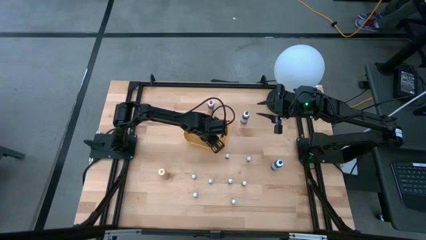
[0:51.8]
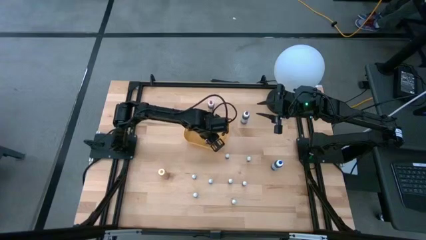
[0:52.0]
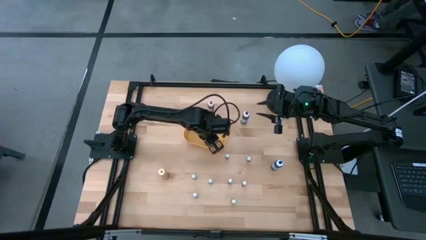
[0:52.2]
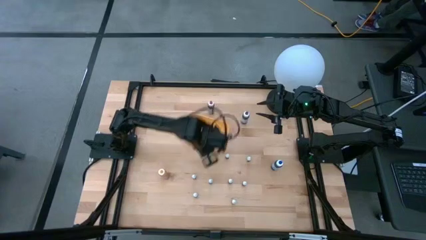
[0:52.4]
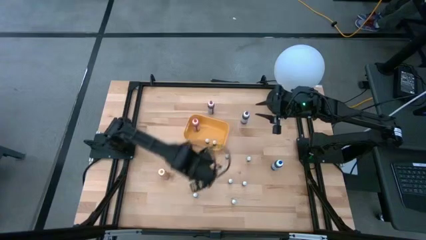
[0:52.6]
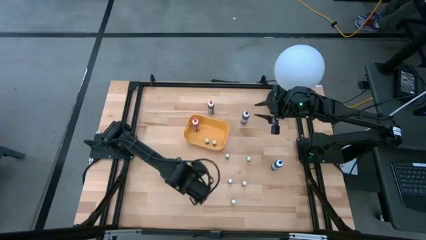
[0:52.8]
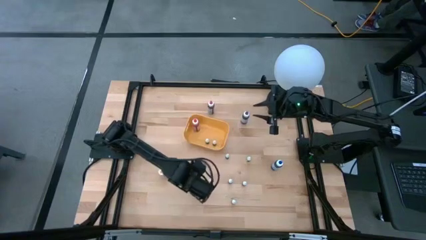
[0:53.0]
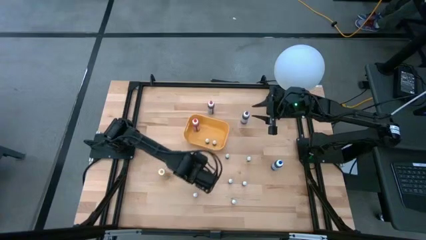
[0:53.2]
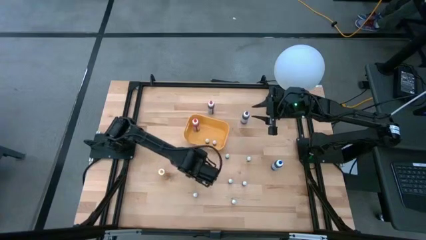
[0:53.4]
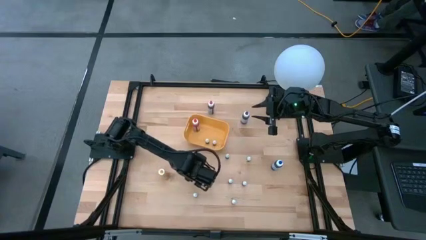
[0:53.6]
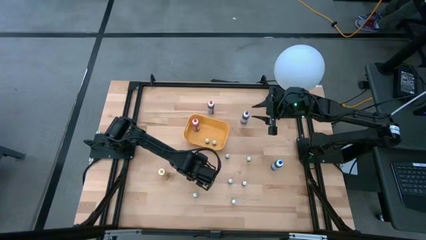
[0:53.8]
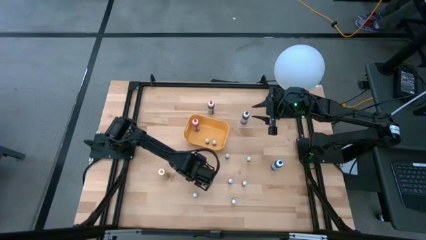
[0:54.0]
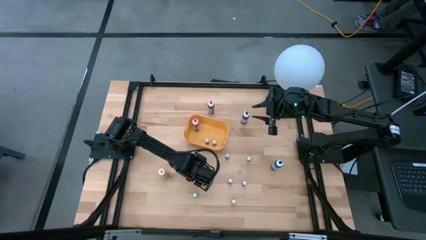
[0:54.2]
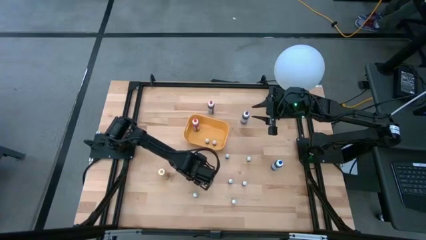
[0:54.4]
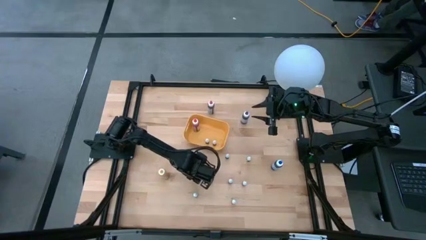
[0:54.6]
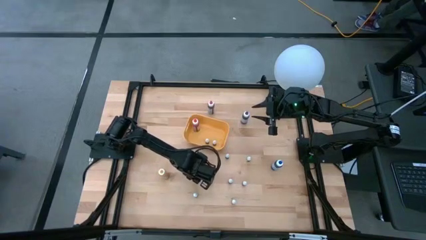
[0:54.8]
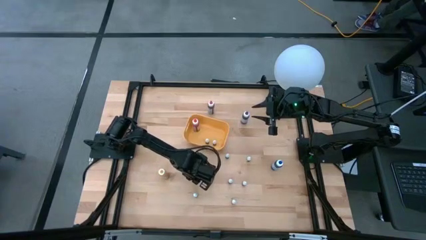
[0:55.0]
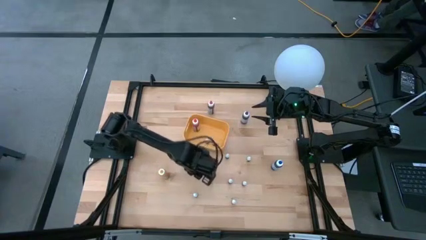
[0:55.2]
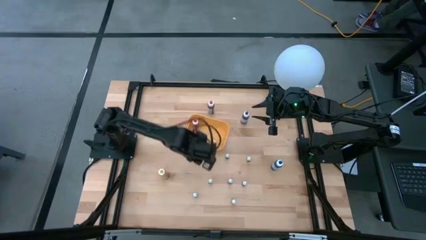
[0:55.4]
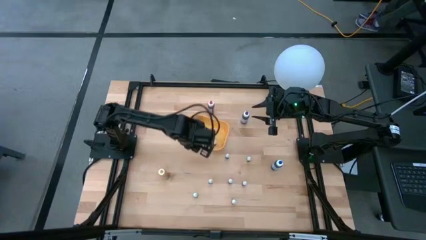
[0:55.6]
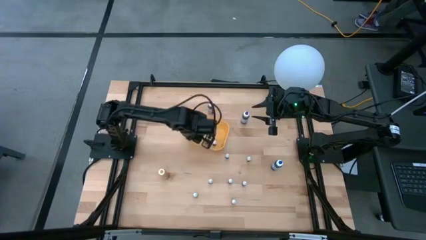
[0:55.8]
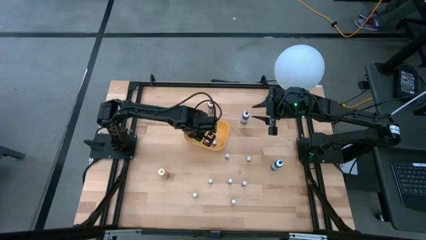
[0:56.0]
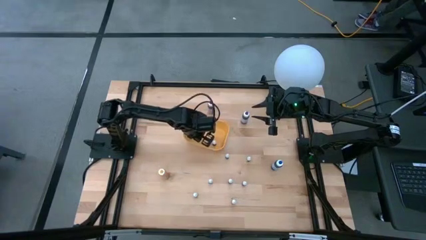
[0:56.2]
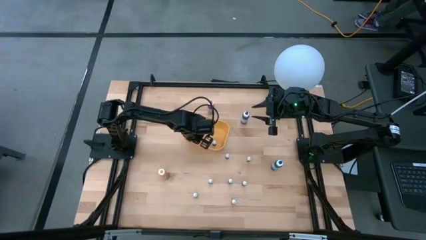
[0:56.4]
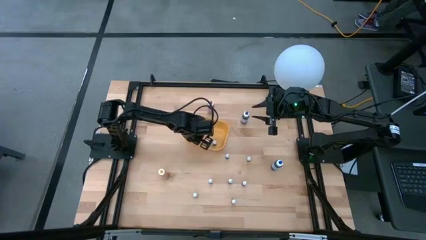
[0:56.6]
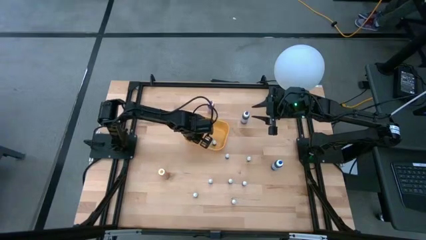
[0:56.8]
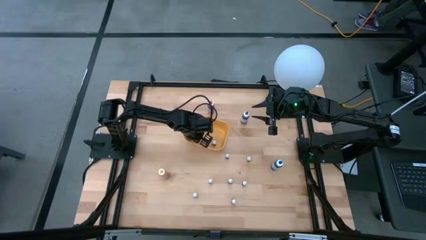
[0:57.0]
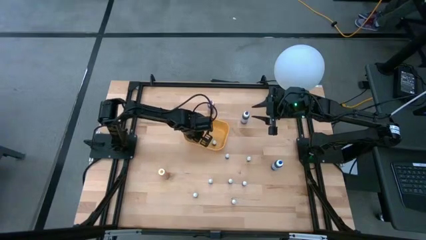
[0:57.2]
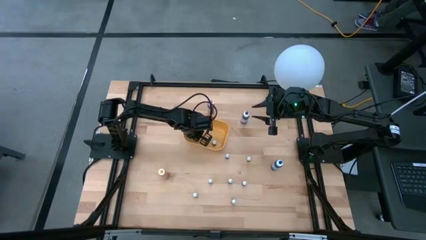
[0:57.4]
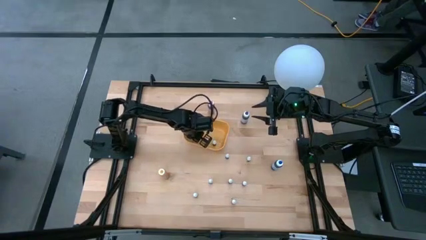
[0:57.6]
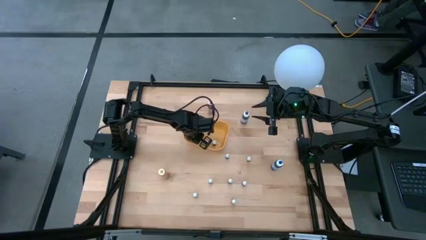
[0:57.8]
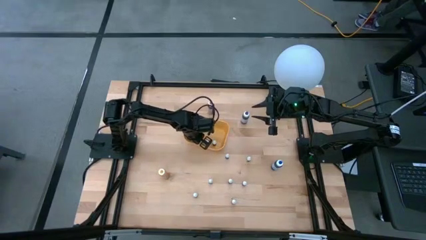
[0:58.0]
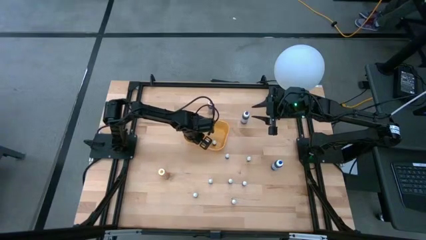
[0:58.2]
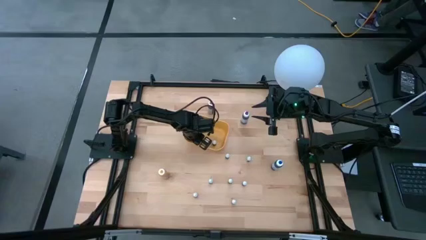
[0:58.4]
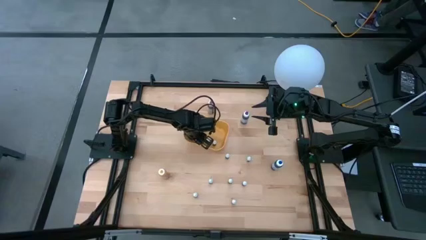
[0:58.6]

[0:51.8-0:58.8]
Task: Pick & Place food coloring
Put the bottom small red food coloring bottle into the yellow bin

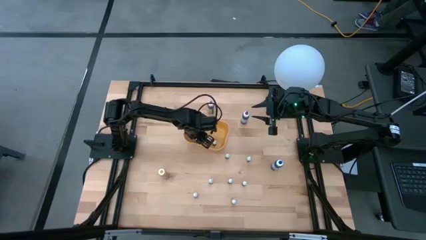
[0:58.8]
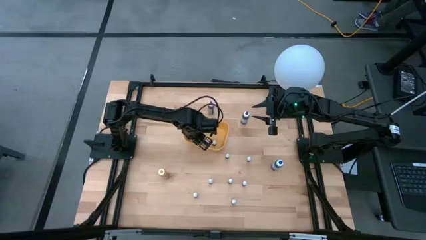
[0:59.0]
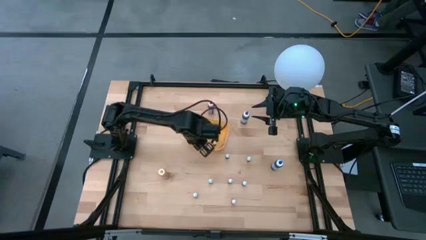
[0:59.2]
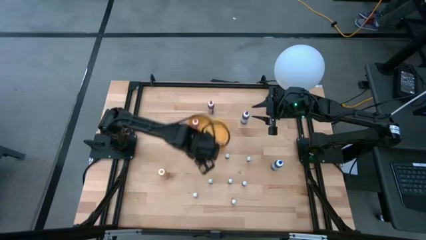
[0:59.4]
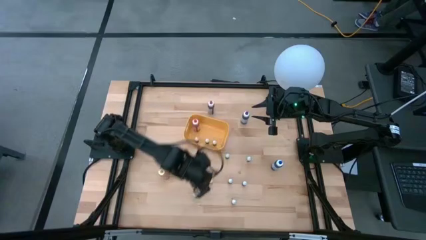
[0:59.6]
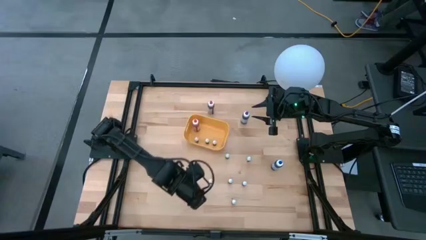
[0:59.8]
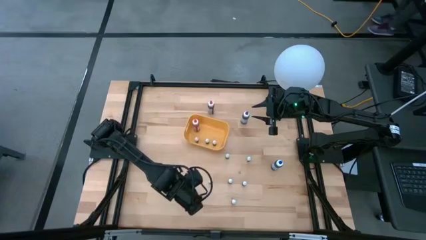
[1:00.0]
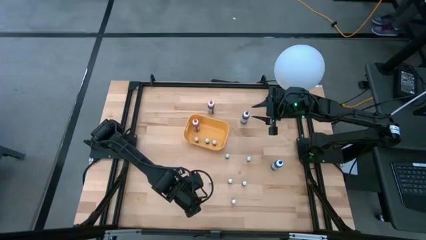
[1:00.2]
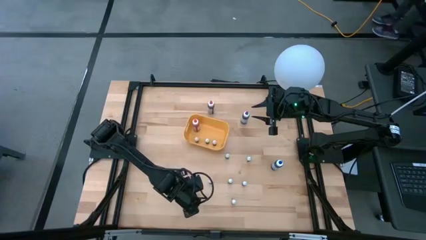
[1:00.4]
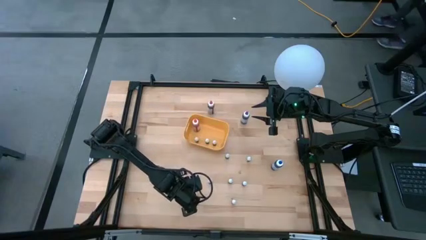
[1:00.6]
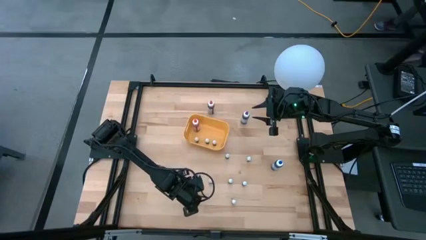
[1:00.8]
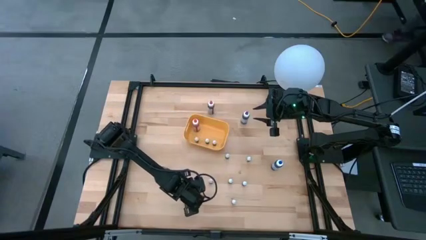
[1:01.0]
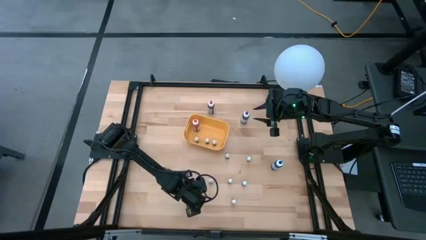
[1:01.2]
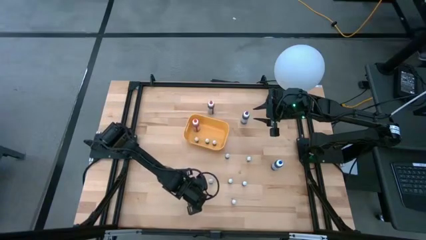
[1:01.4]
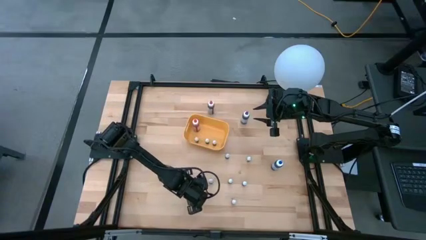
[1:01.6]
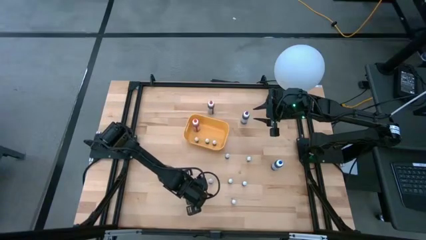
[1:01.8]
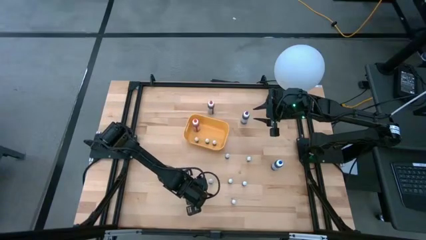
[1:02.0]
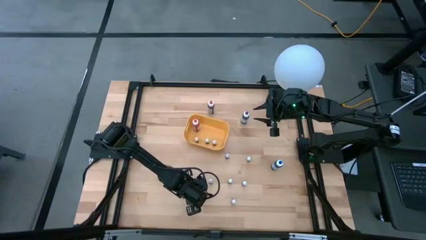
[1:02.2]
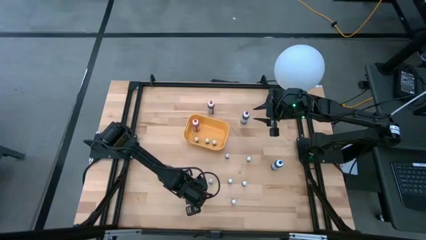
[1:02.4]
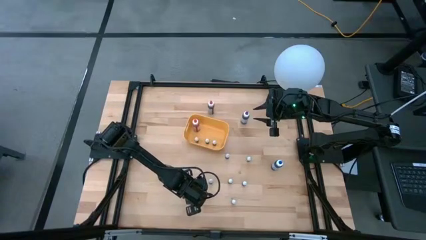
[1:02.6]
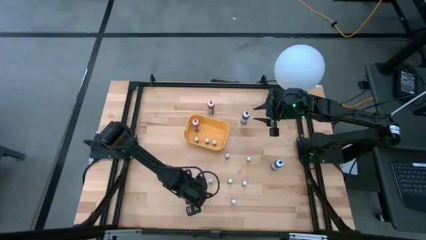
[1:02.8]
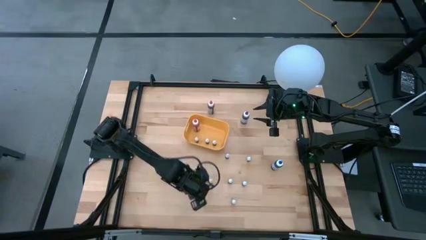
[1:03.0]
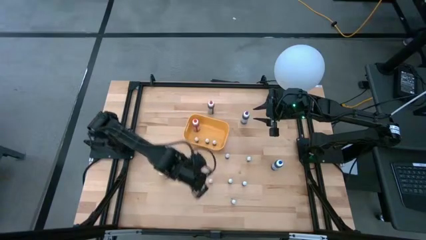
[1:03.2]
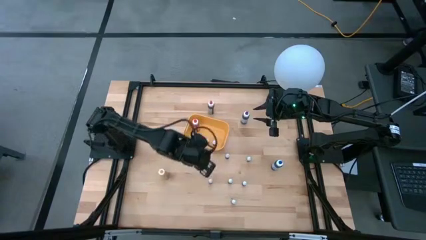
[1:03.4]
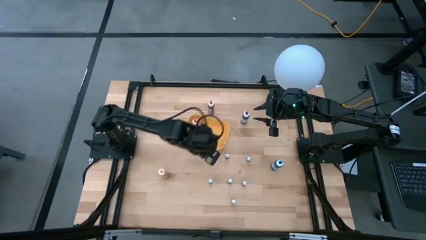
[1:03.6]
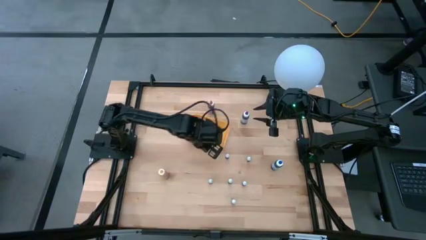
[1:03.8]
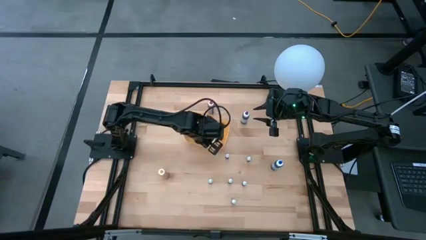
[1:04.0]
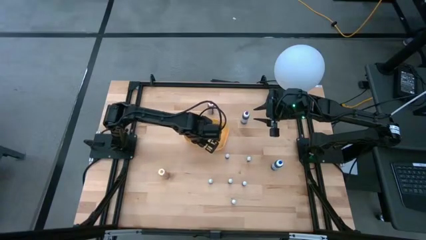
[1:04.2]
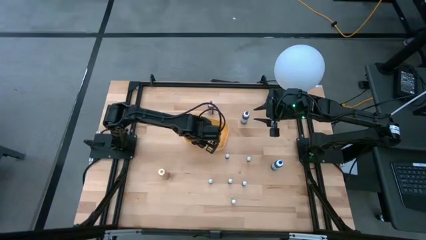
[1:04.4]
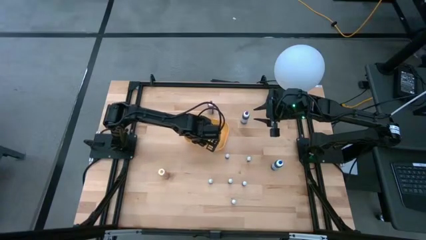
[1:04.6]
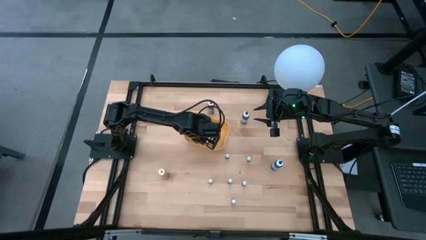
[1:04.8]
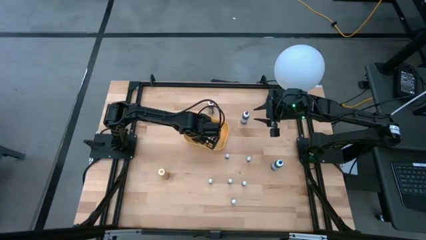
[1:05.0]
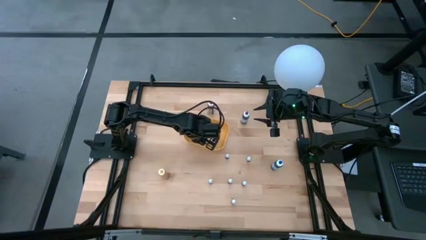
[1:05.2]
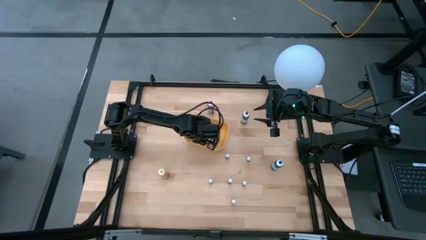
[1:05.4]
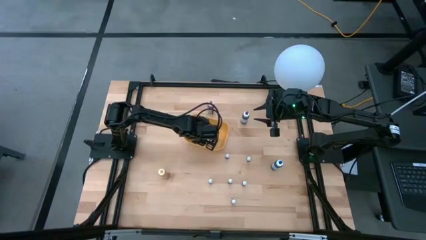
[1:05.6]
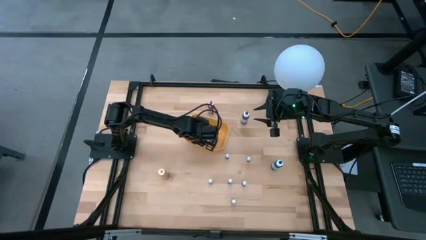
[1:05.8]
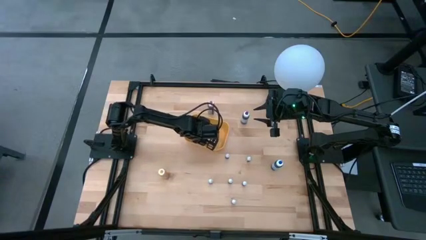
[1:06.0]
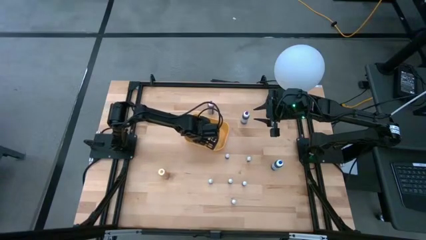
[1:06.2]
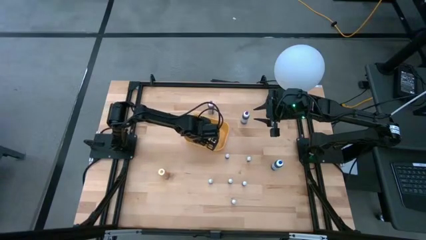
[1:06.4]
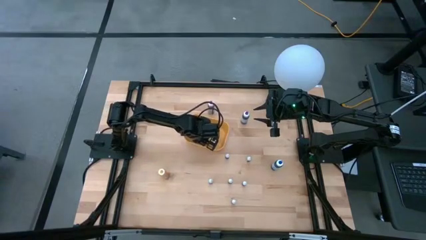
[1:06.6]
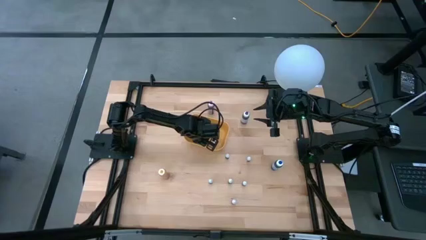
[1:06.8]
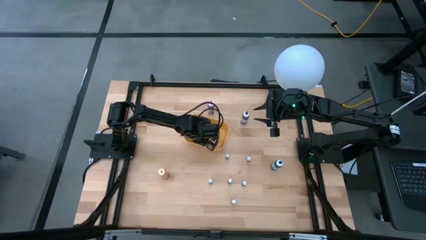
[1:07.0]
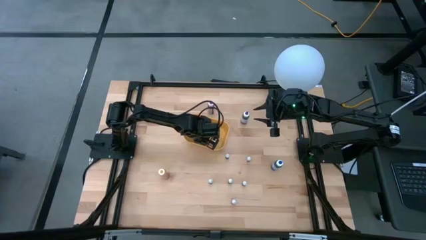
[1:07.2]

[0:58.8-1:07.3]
Put the small green food coloring bottle into the yellow bin

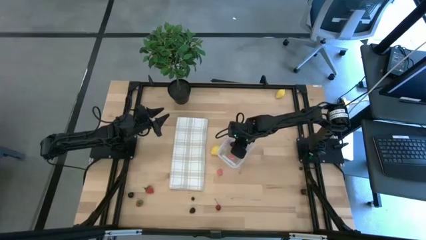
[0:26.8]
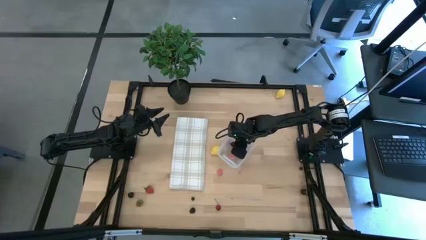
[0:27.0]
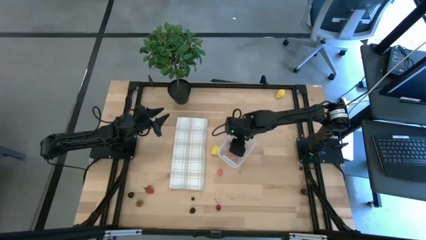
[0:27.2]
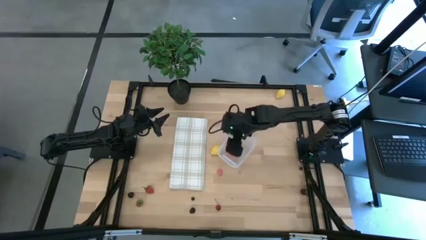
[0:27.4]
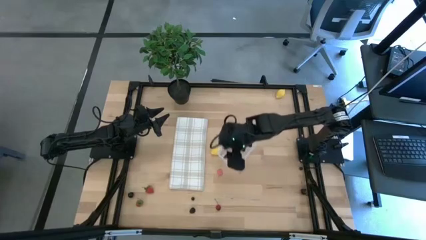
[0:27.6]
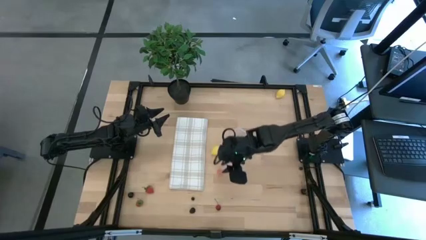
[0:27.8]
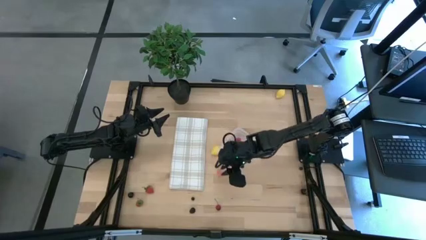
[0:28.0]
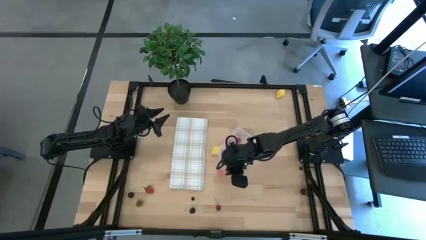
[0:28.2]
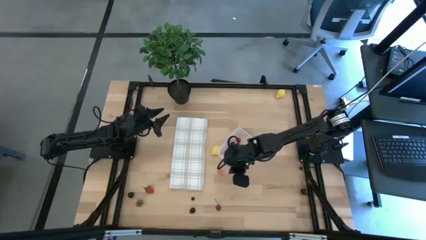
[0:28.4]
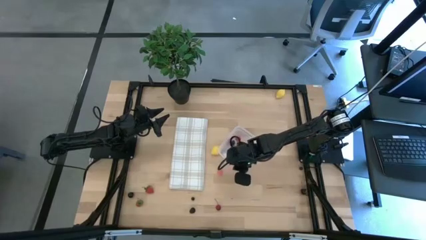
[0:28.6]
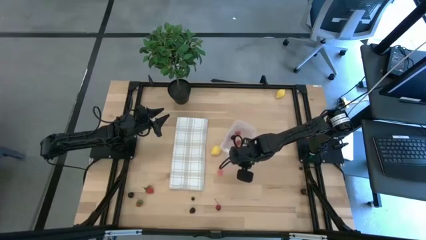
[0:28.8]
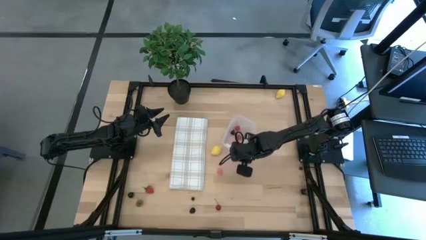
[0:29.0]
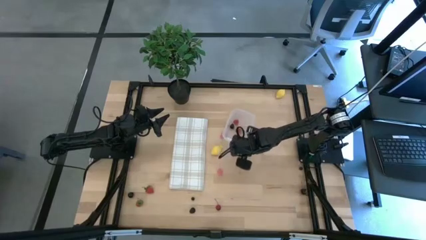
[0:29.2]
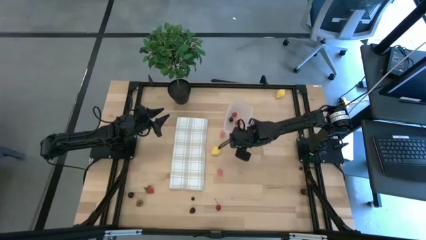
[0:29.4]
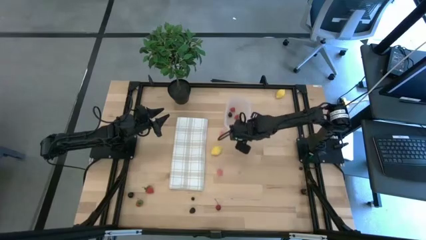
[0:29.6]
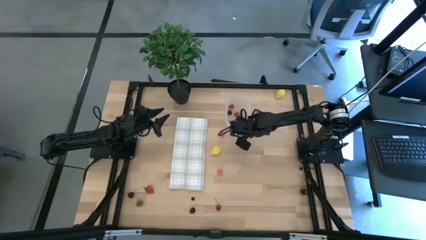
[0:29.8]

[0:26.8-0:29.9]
Task: Pick and placing Produce into tupperware
Move the transparent bin to the top center of the table
